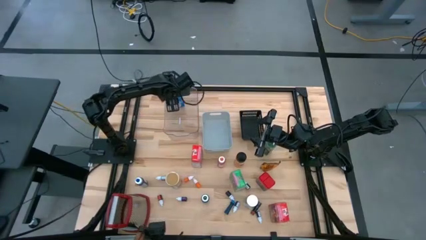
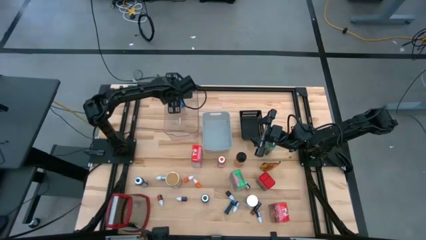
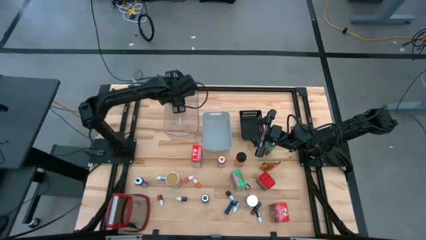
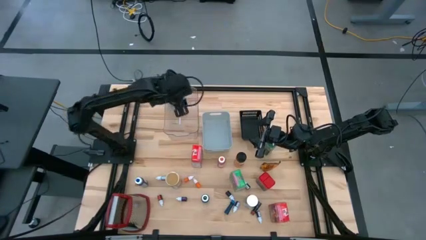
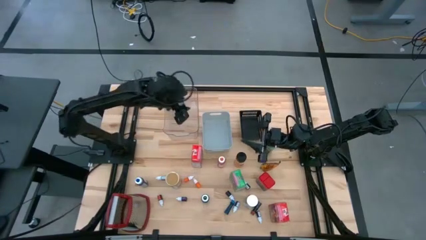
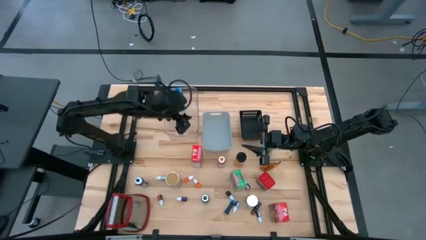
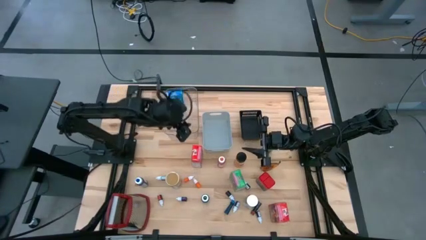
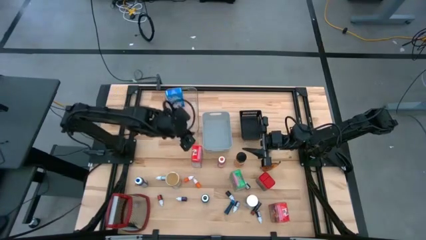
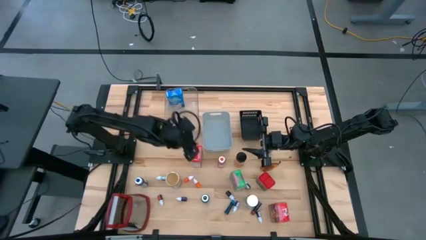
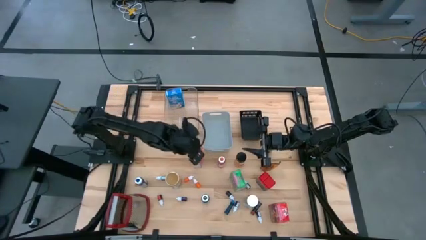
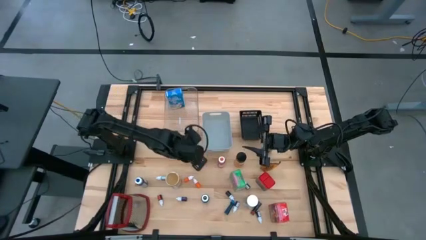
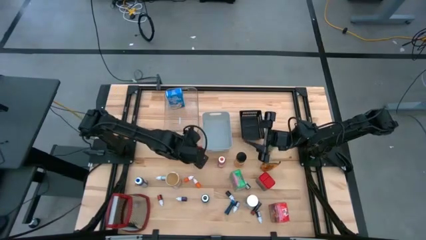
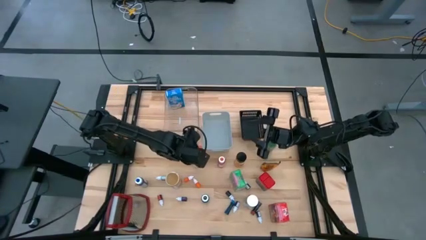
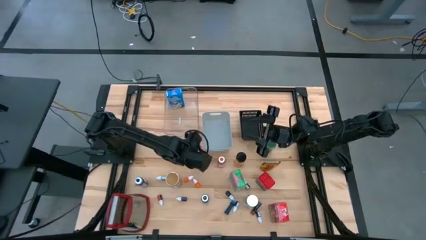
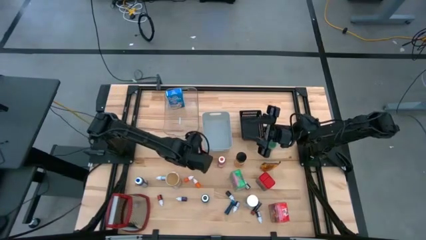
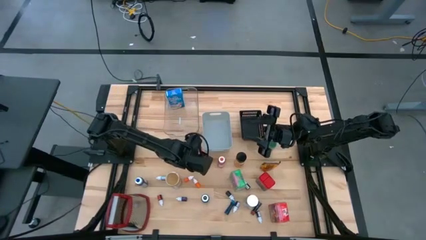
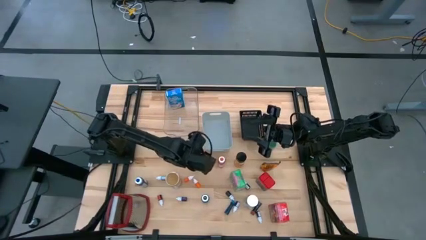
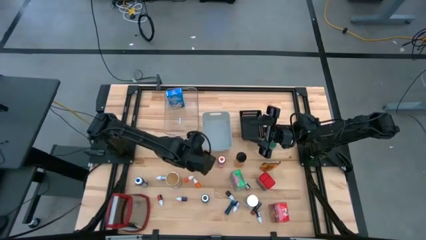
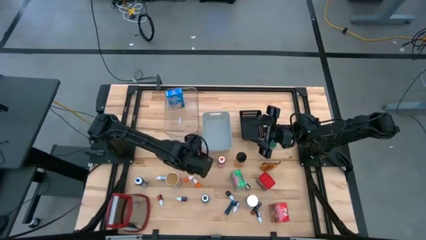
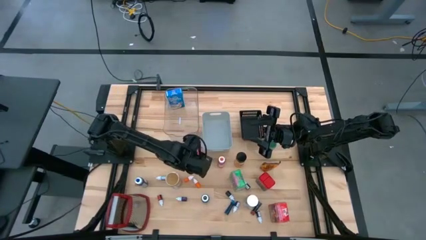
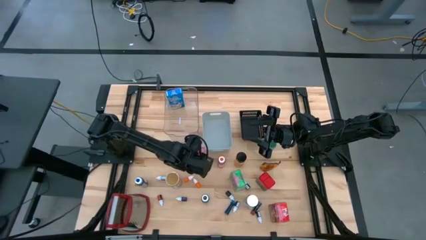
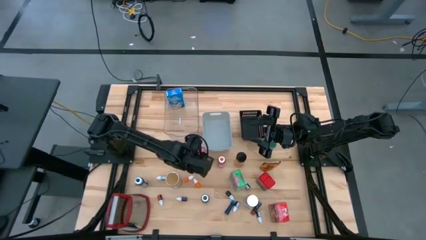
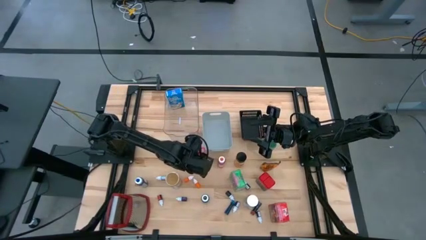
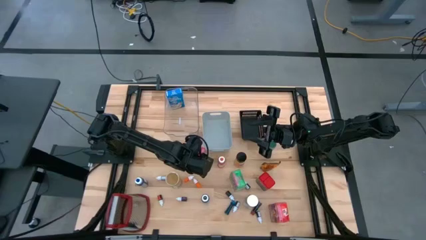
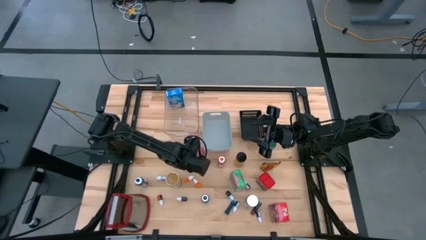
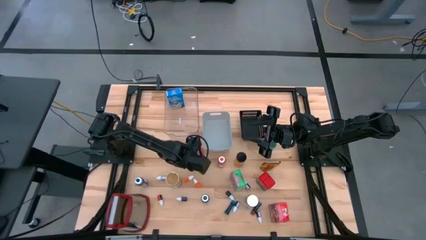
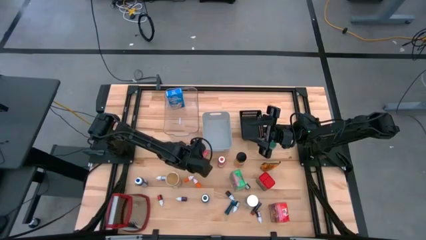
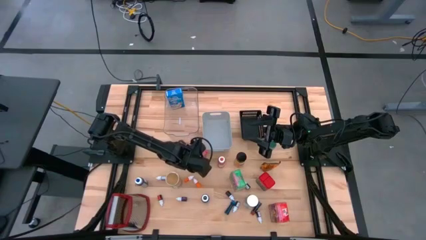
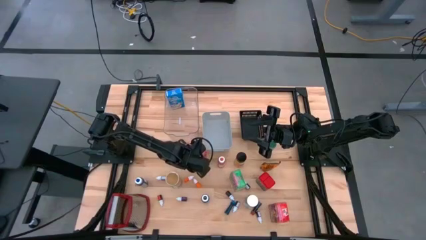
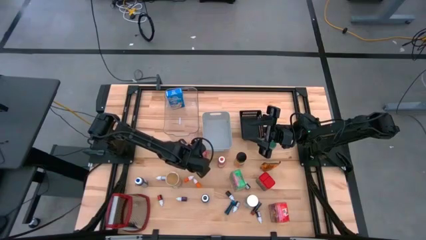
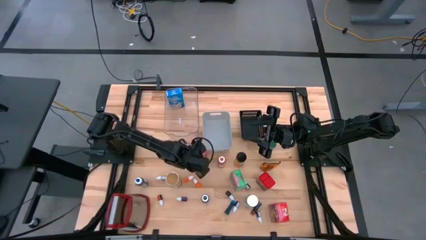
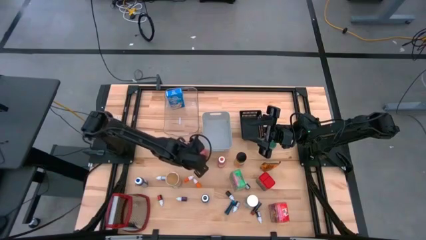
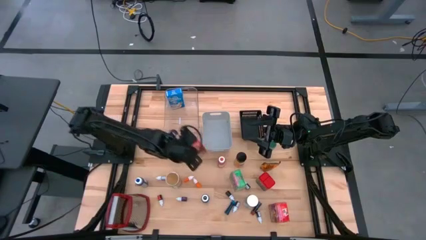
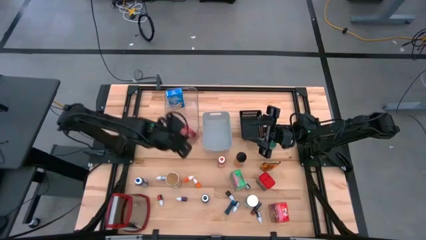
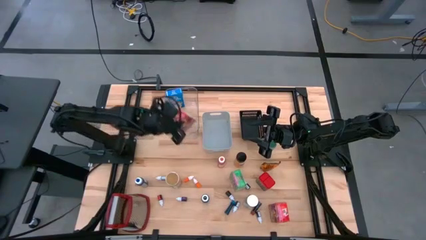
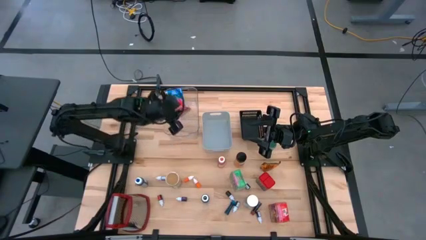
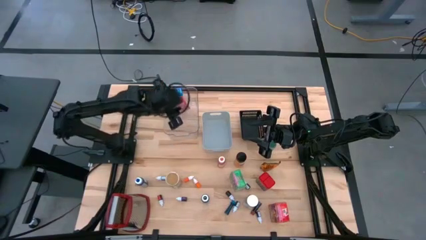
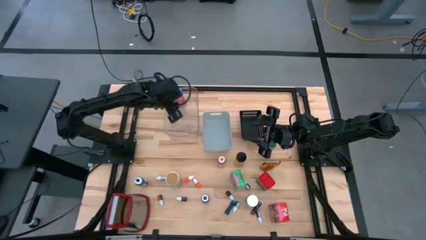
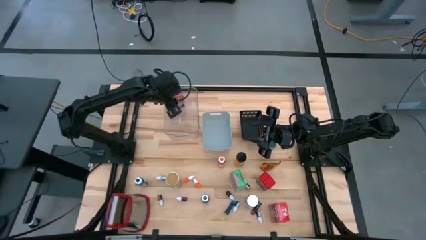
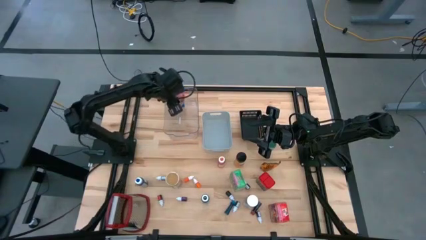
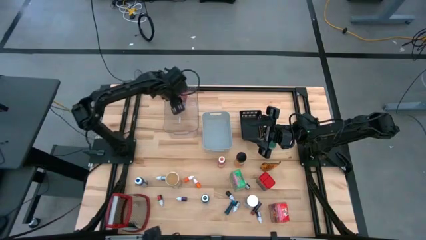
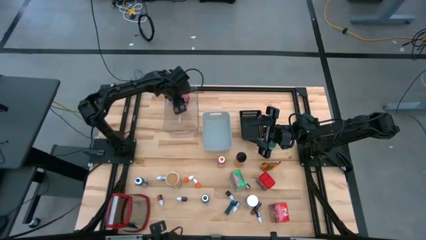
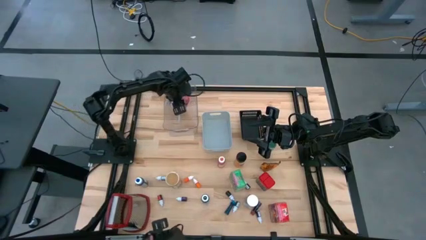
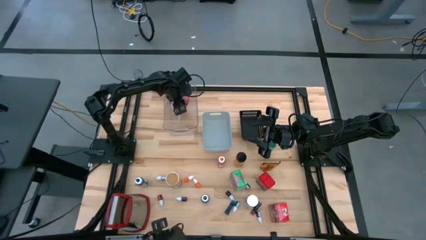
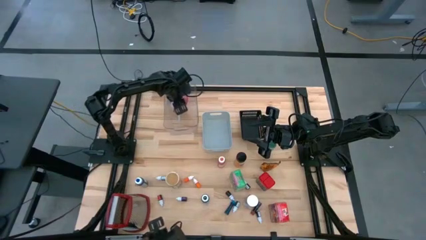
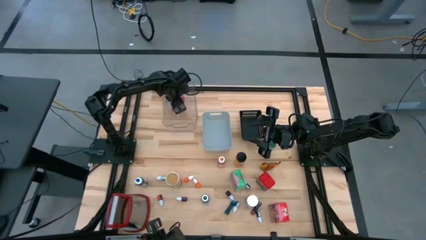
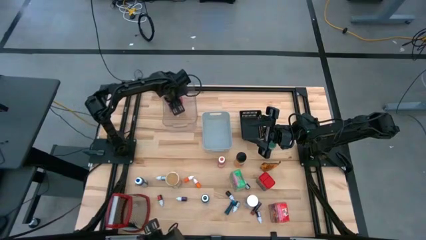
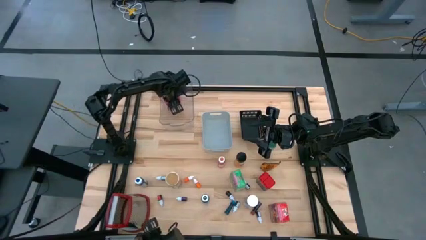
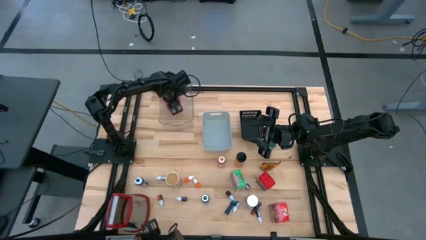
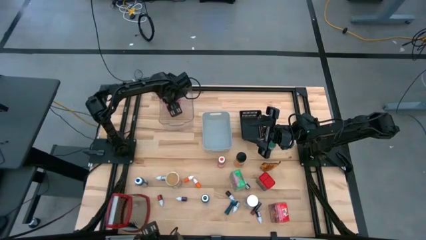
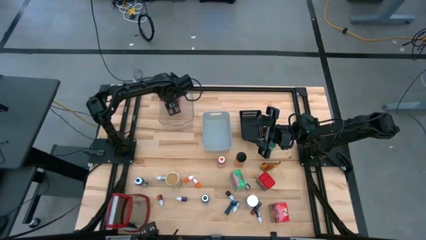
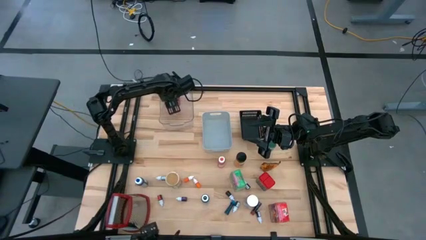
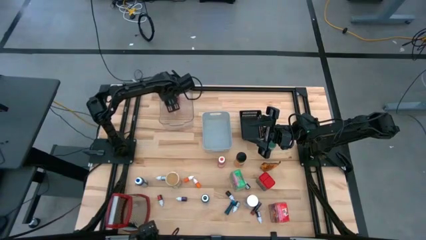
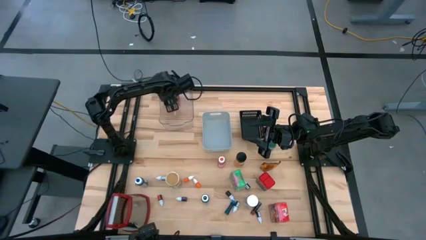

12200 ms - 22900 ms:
Task: Pick & Place Kitchen Items
Put the red cereal box into the transparent bin

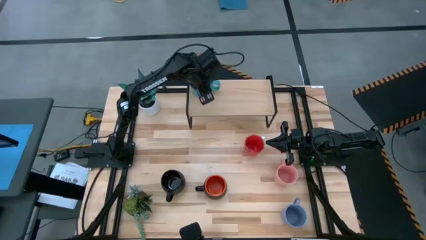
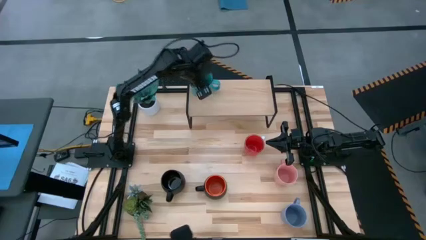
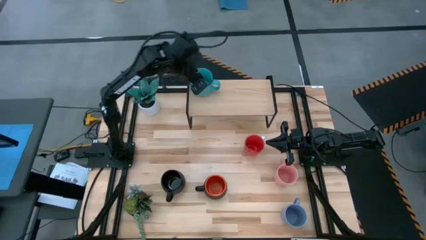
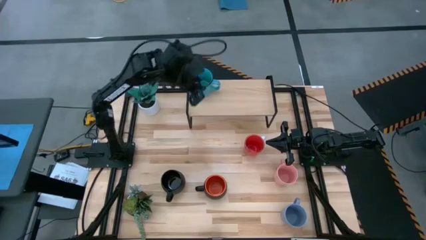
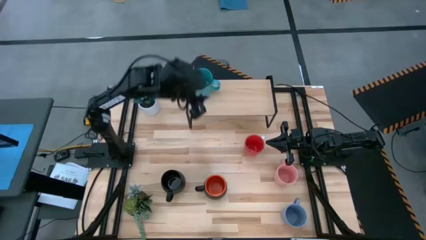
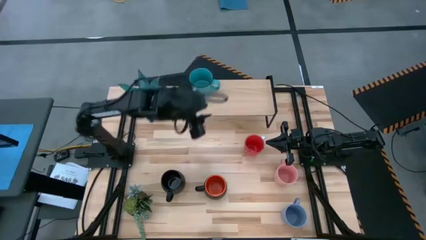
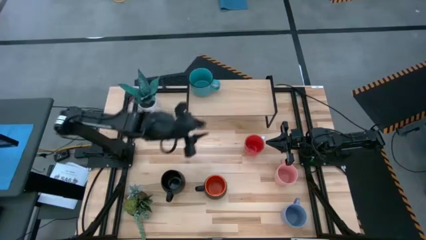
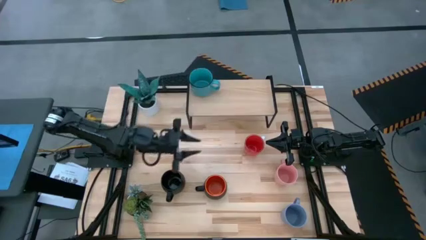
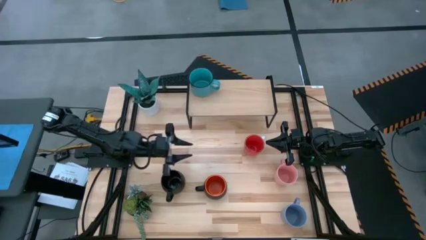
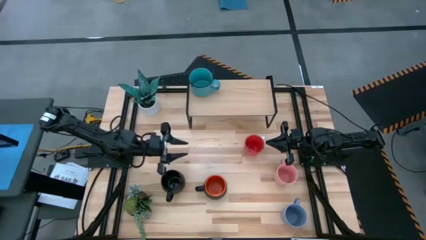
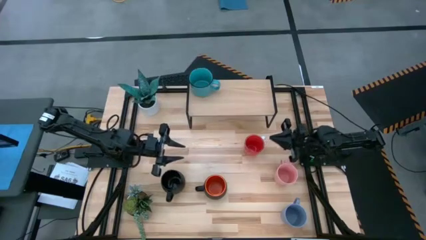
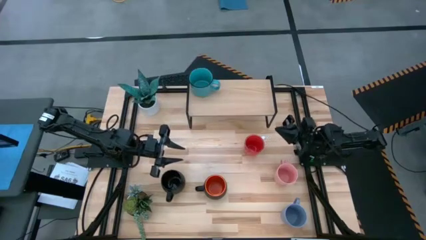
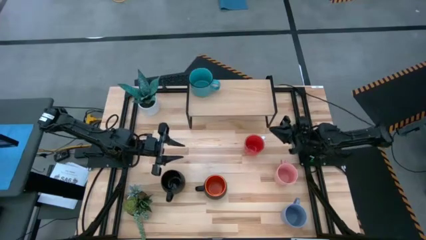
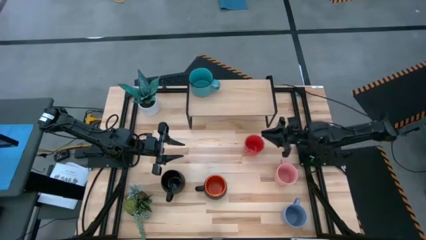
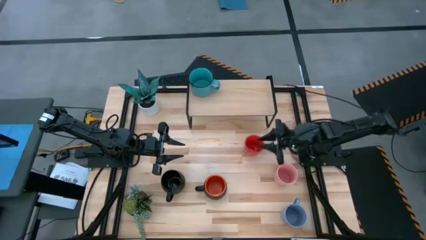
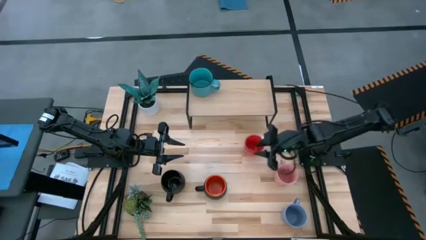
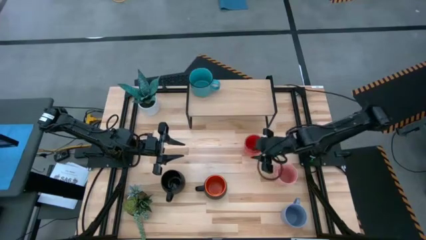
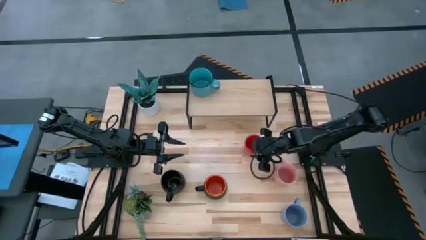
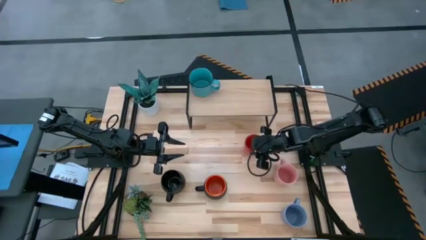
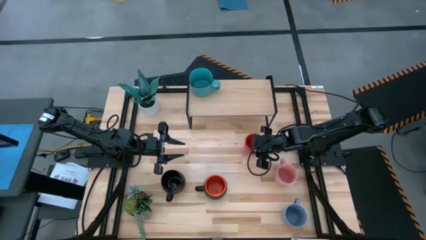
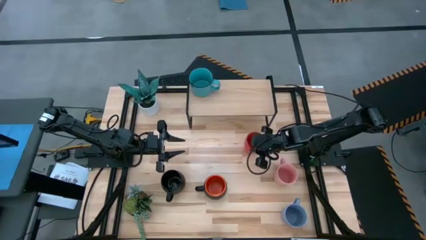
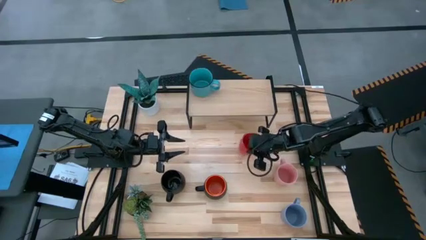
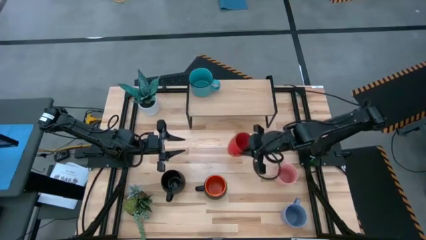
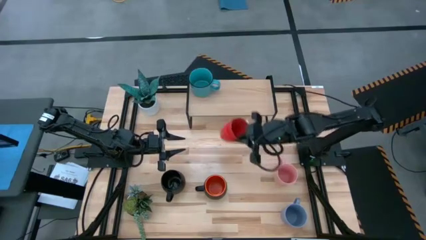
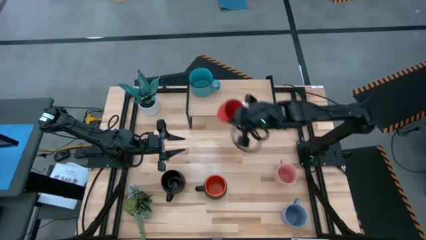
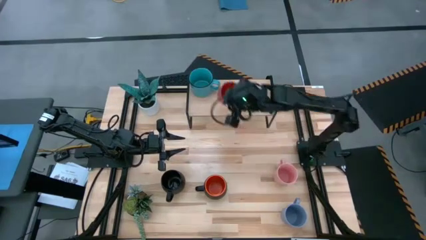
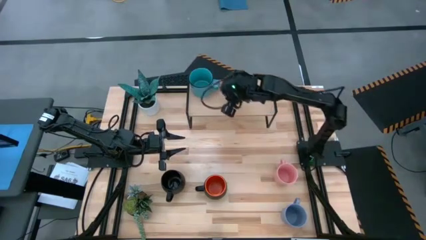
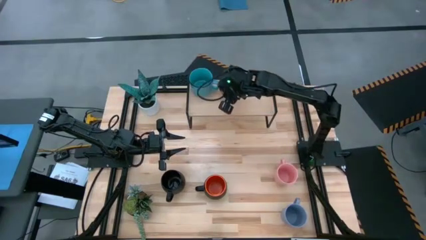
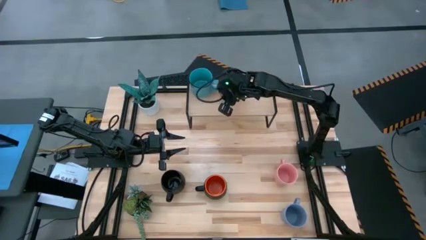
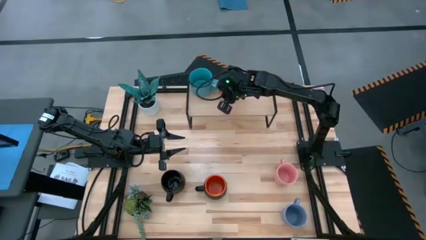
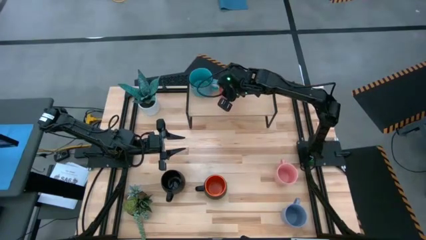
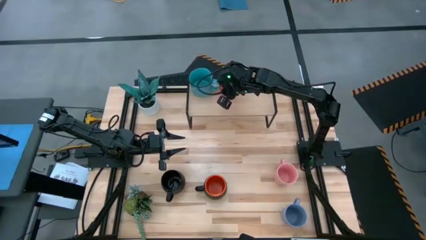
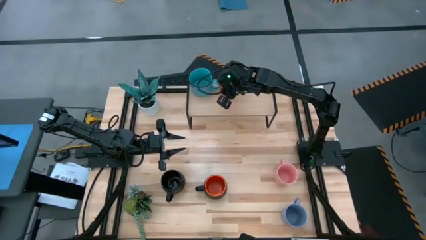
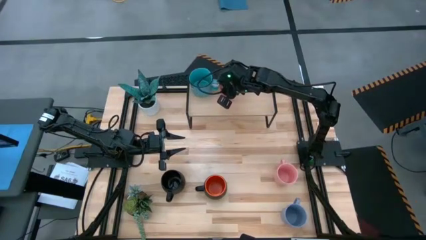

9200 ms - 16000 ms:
Task: Place coffee mugs
Put the red mug on the shelf
